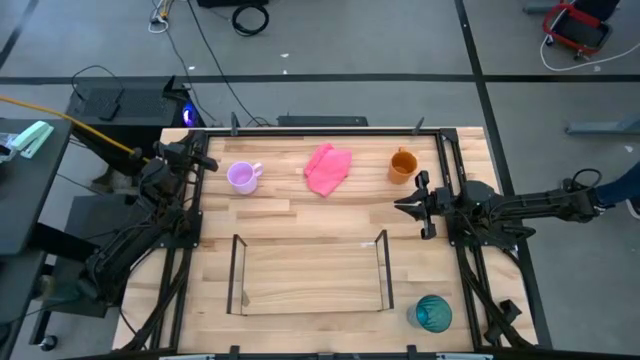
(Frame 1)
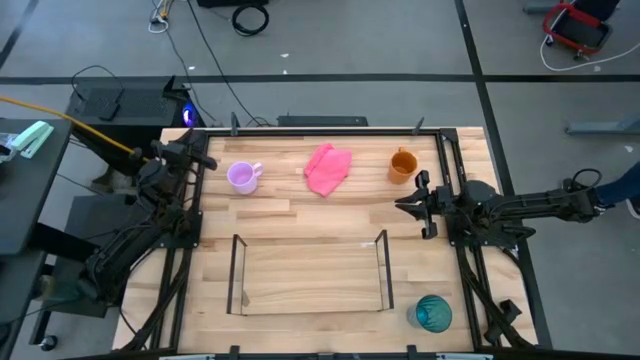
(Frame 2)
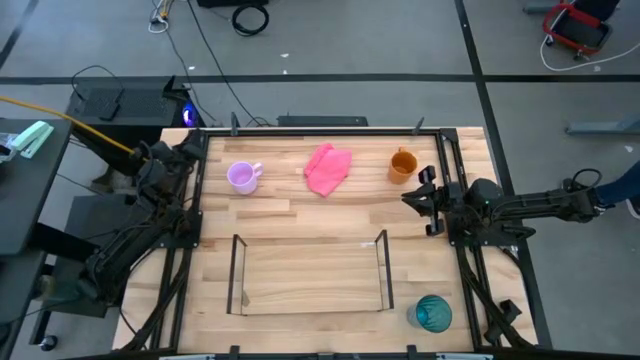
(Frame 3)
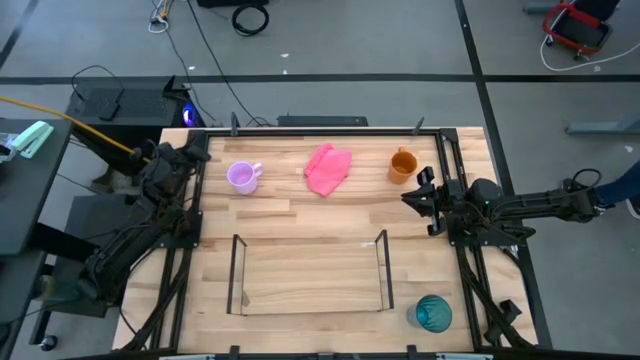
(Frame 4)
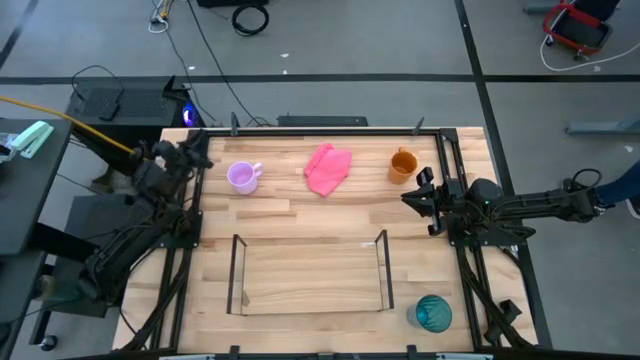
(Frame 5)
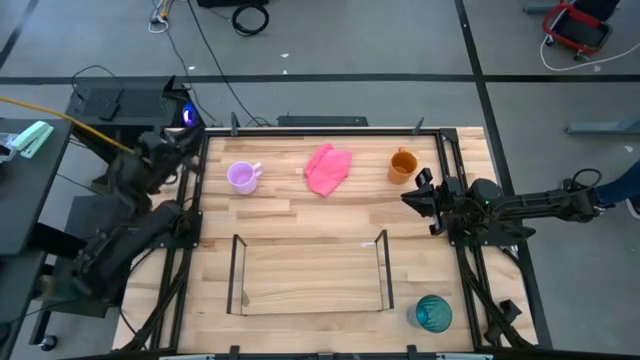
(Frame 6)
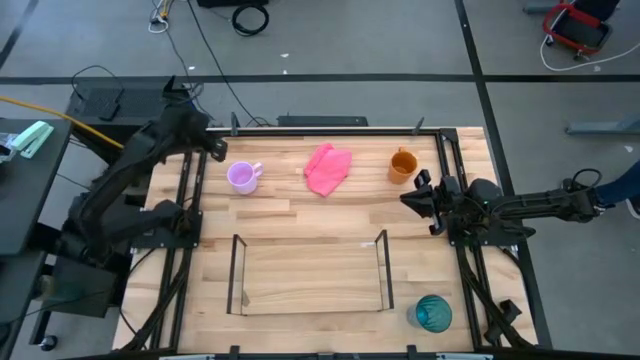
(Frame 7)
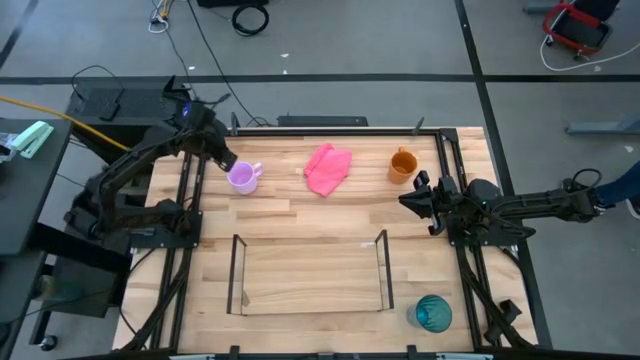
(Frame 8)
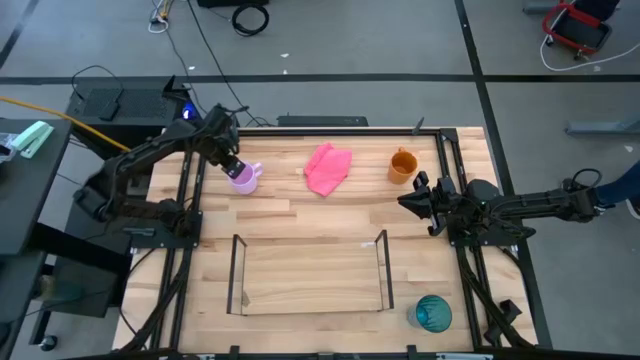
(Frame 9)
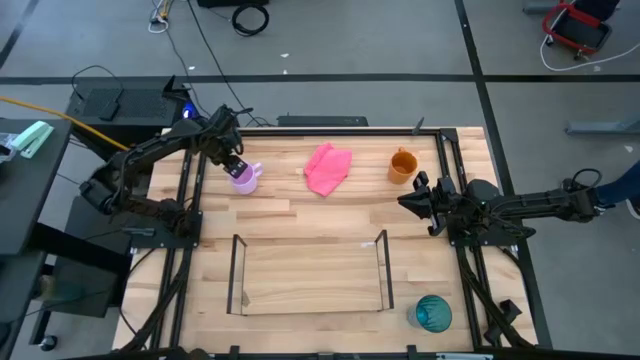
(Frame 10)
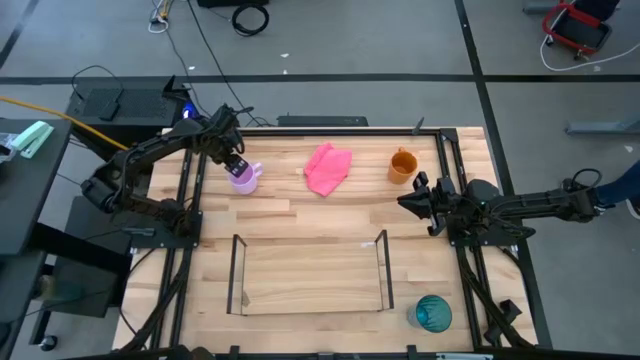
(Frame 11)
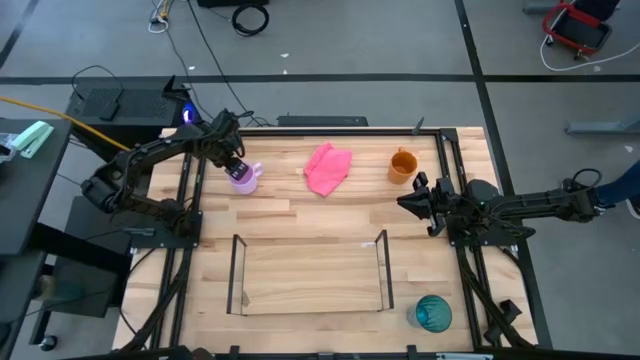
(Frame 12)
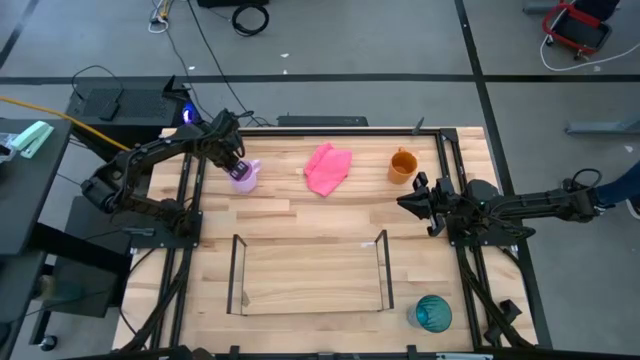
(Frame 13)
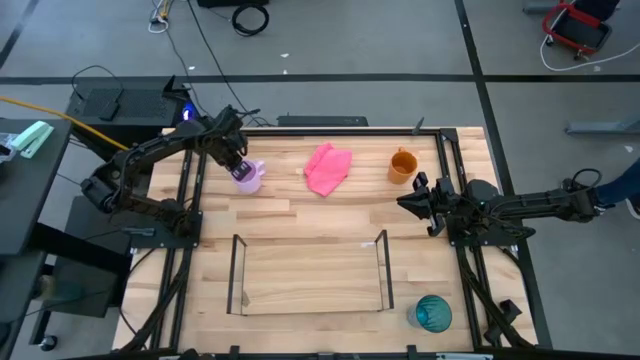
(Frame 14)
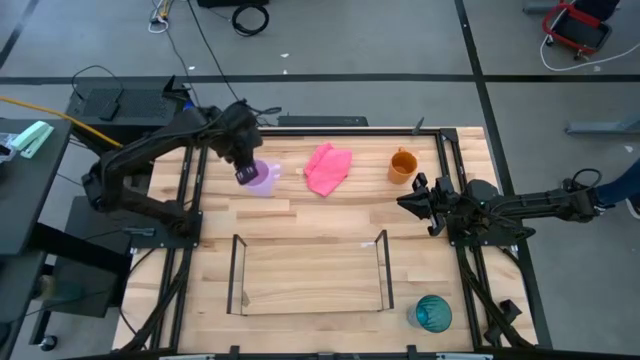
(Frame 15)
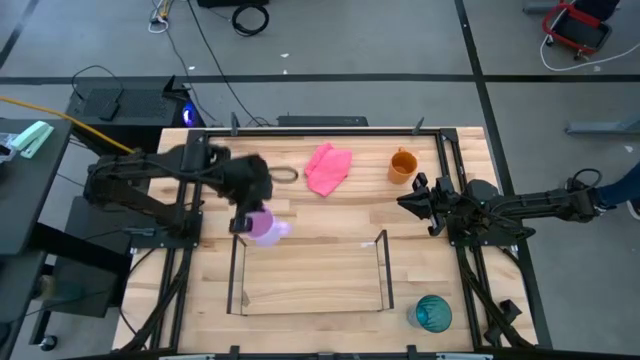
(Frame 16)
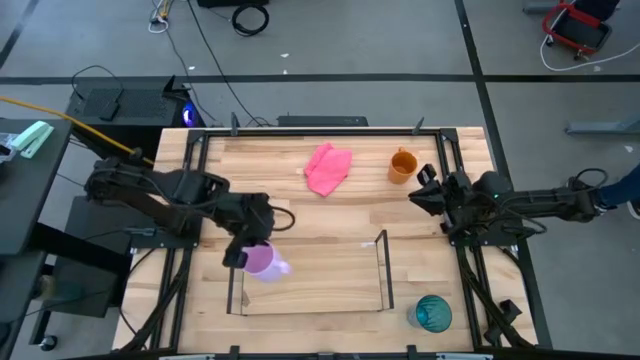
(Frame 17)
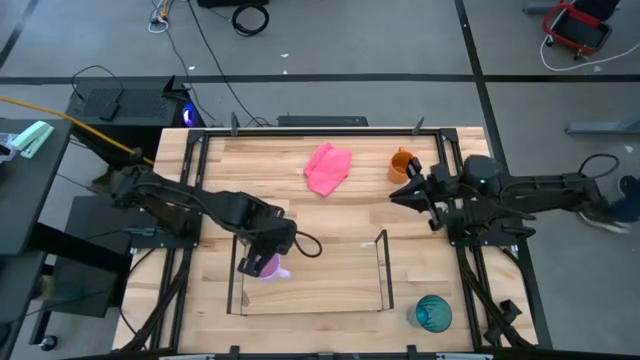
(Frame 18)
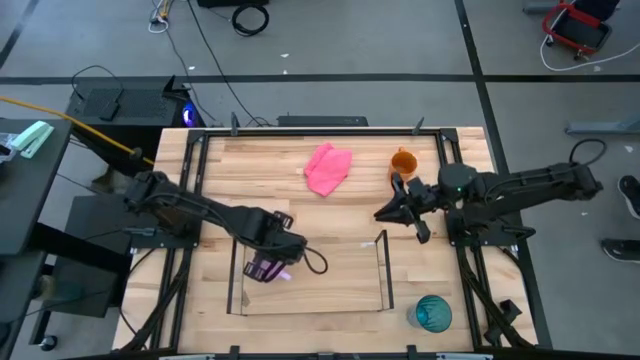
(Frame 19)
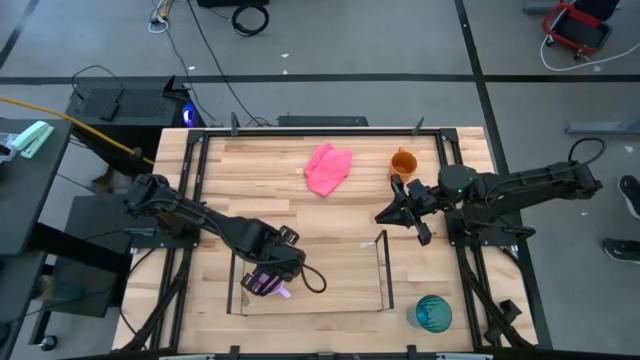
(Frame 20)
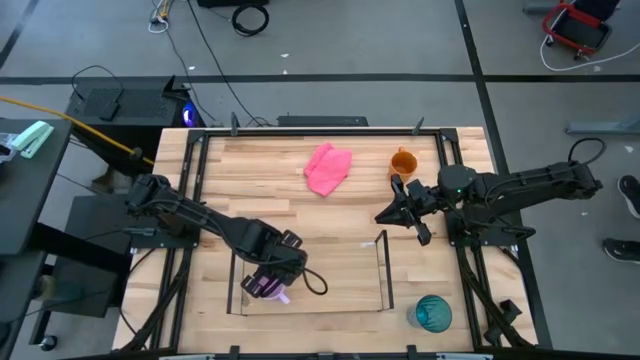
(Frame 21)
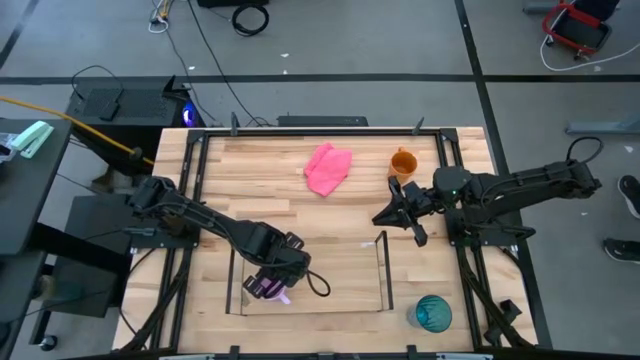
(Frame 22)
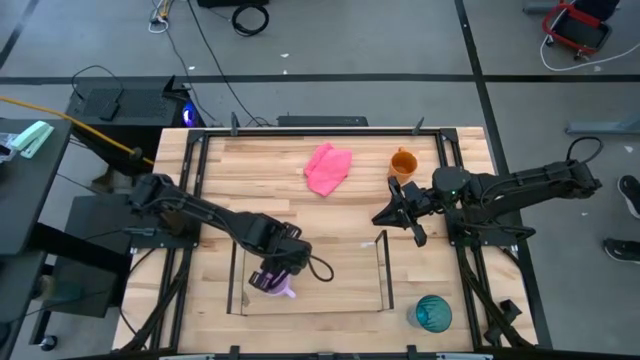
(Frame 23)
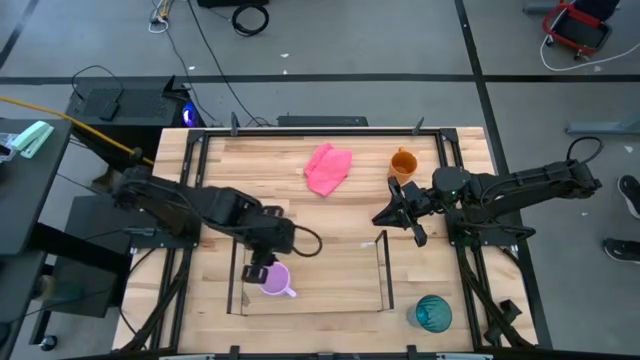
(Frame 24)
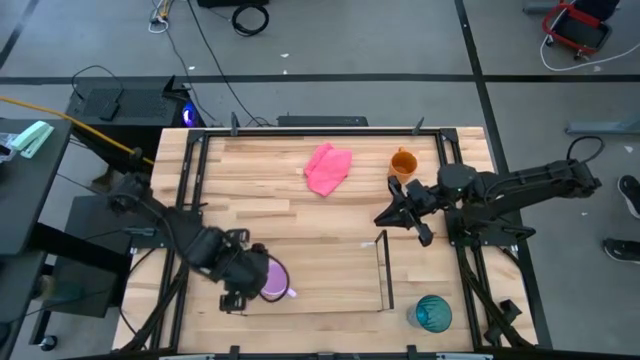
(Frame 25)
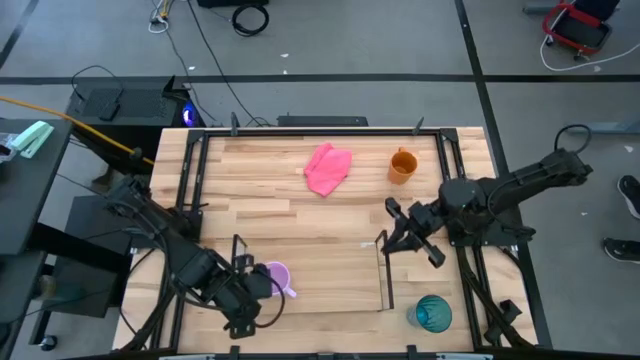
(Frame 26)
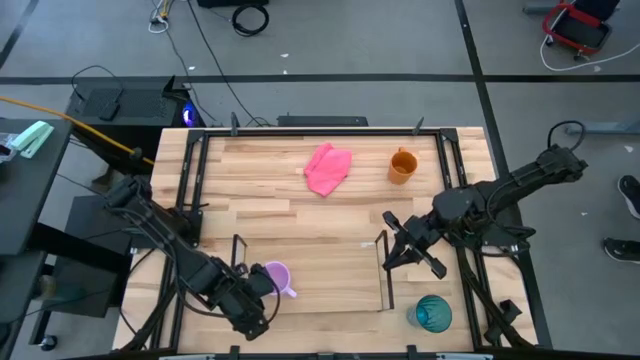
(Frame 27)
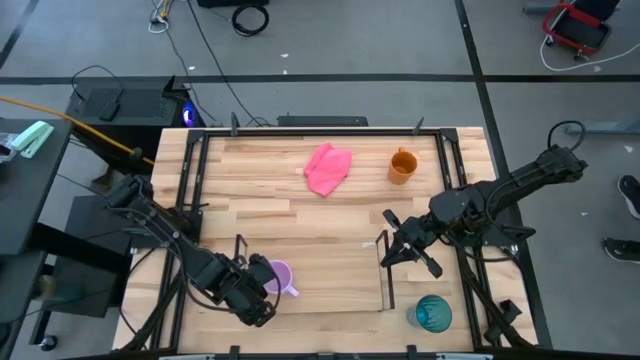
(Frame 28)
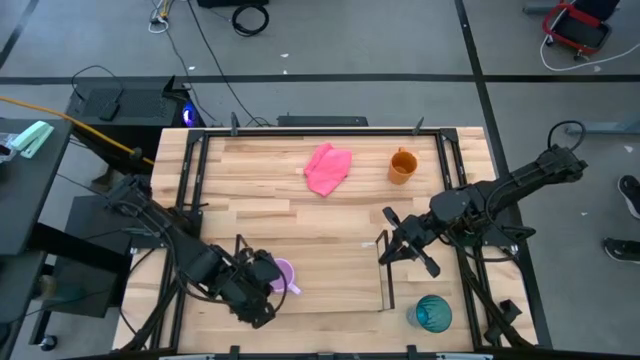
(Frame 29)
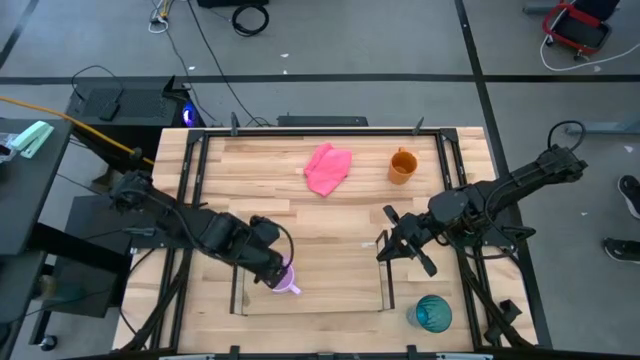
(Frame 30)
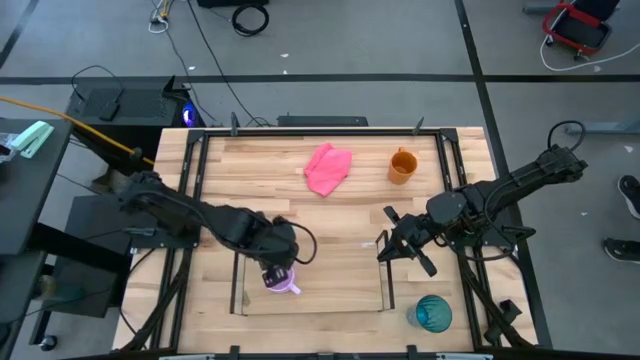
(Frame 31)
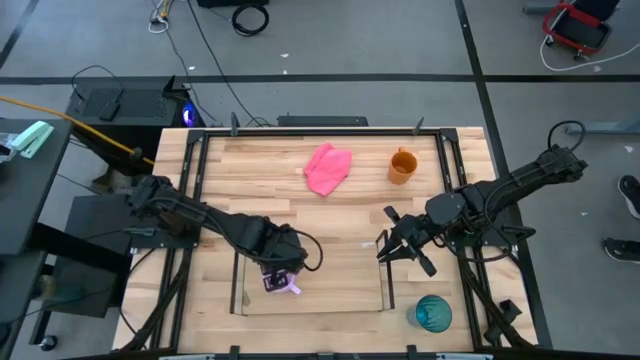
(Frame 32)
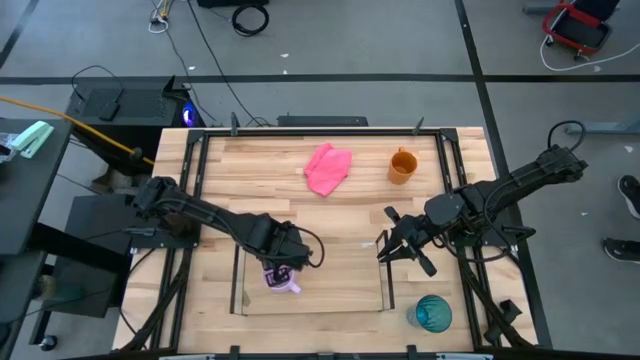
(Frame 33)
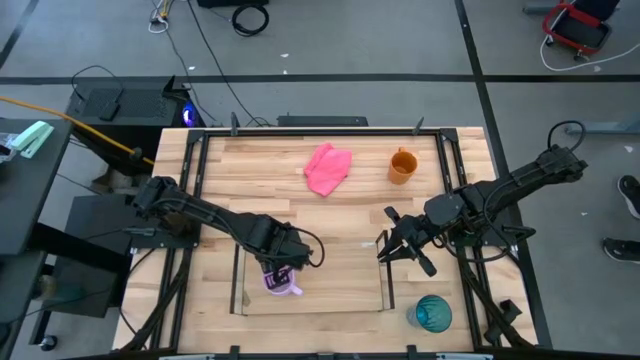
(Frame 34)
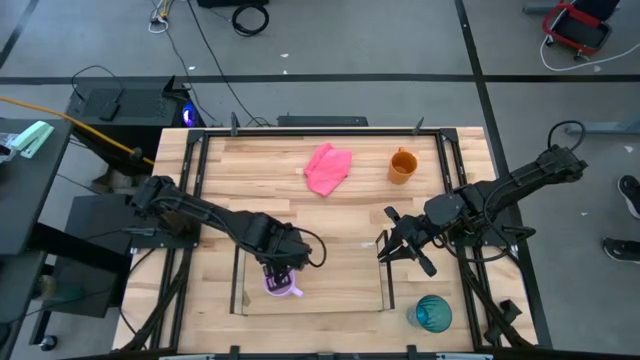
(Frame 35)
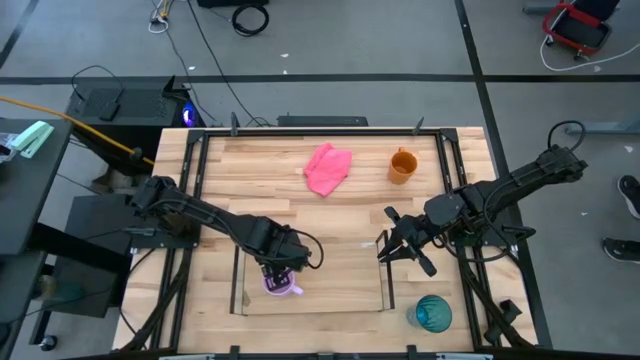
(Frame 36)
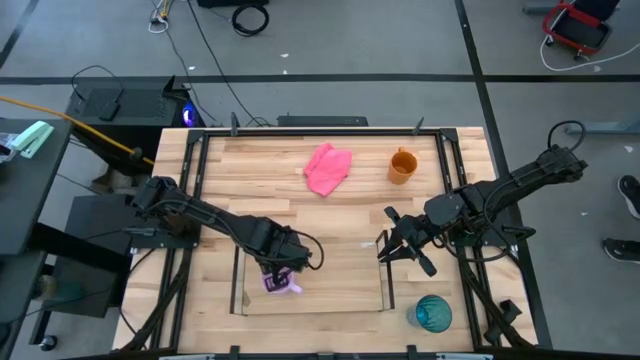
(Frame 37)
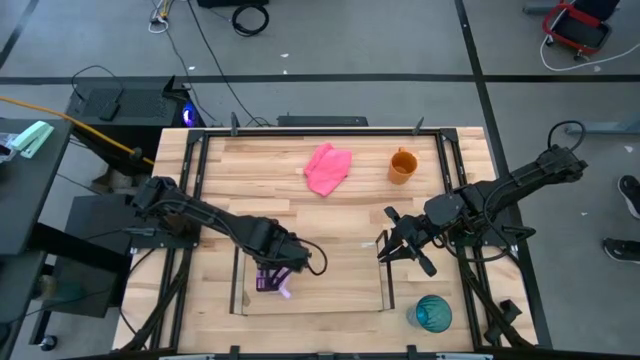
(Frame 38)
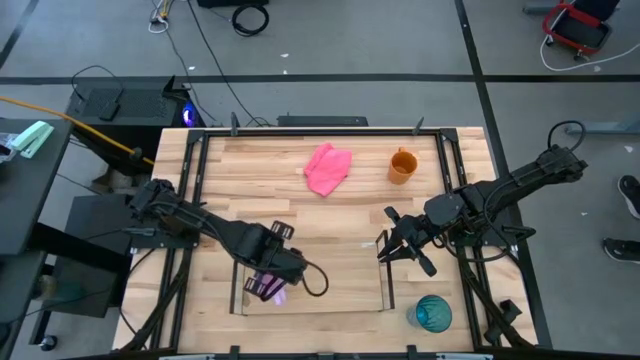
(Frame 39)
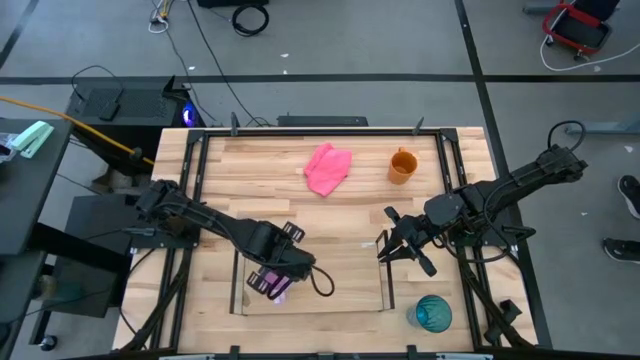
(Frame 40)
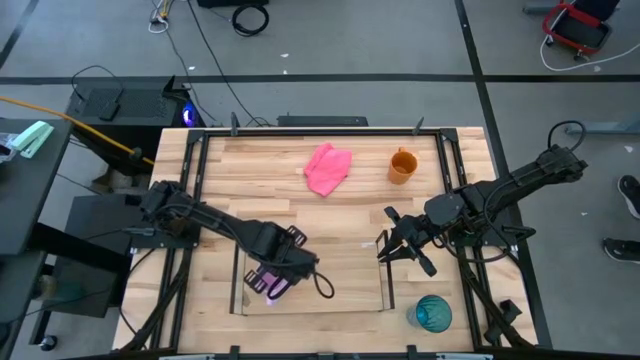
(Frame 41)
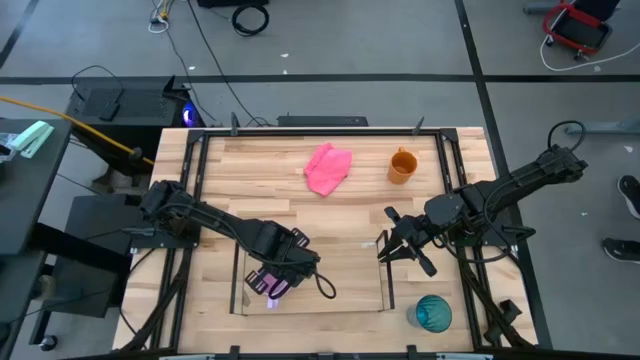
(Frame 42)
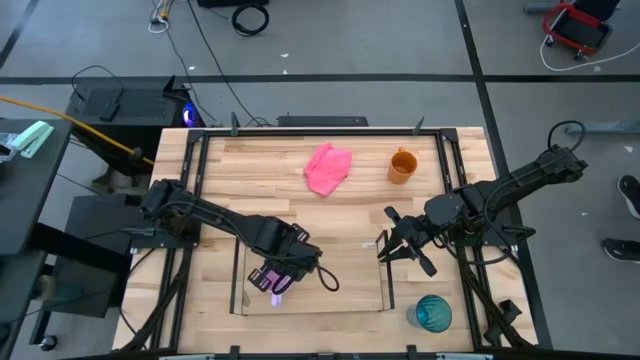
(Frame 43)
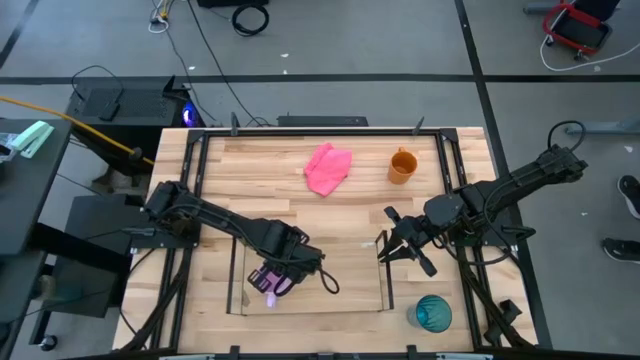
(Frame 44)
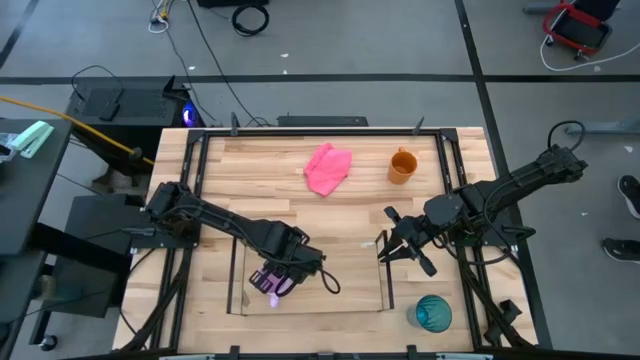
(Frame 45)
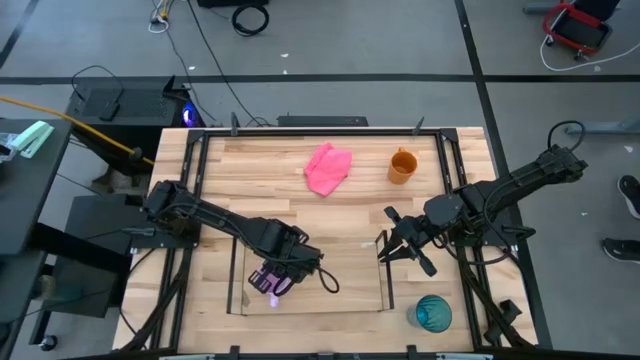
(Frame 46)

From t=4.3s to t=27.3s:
Task: Stack small to large cups/mugs on shelf
Put the purple mug on the shelf
